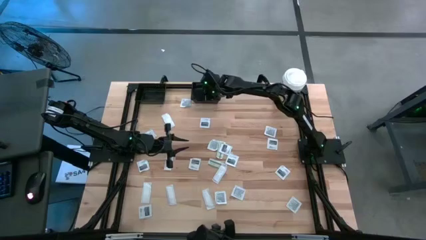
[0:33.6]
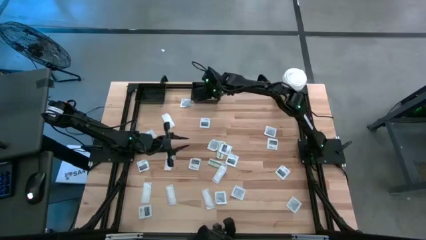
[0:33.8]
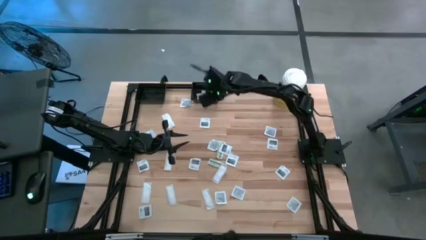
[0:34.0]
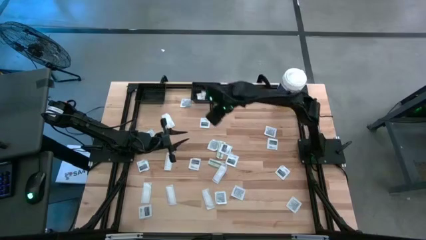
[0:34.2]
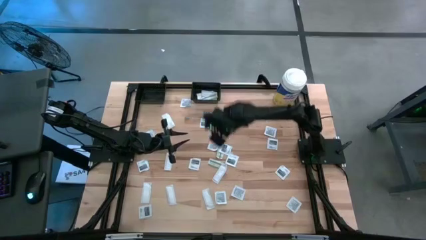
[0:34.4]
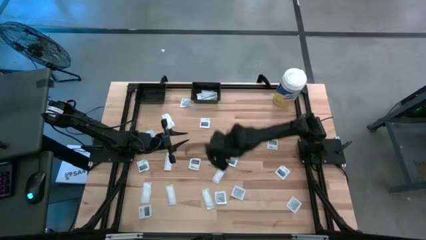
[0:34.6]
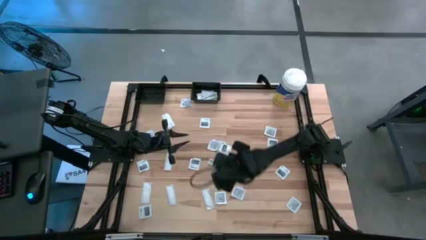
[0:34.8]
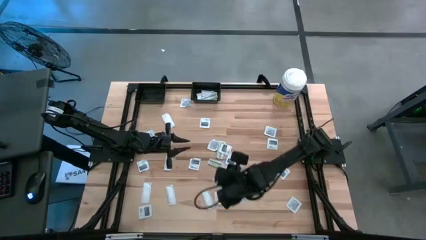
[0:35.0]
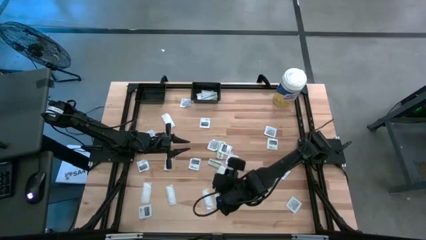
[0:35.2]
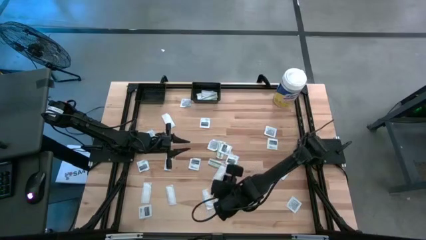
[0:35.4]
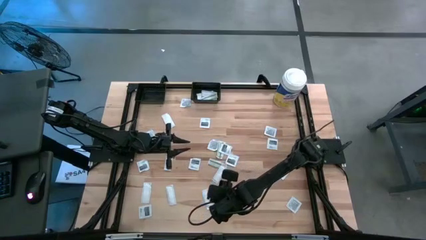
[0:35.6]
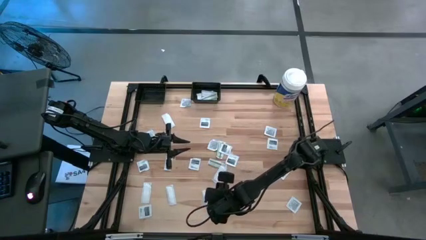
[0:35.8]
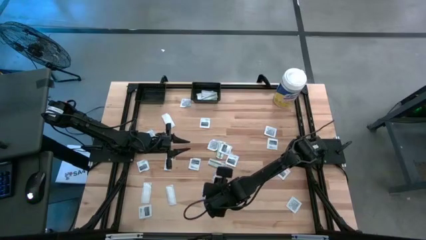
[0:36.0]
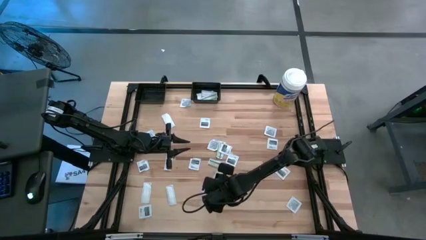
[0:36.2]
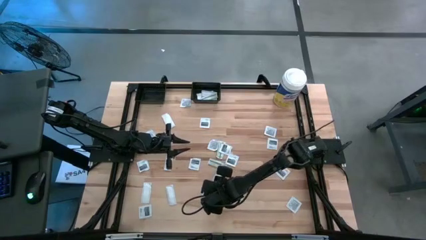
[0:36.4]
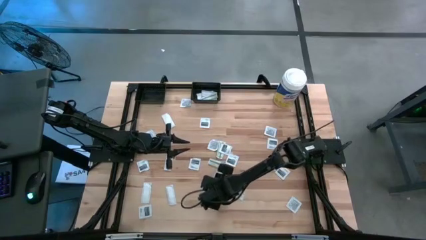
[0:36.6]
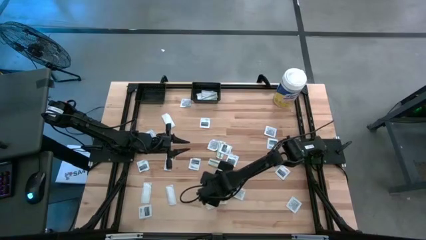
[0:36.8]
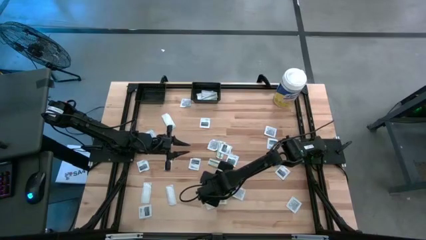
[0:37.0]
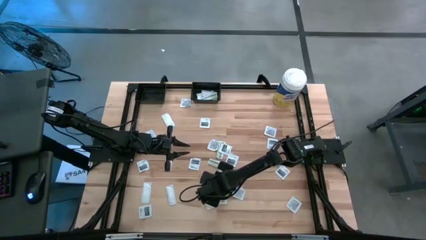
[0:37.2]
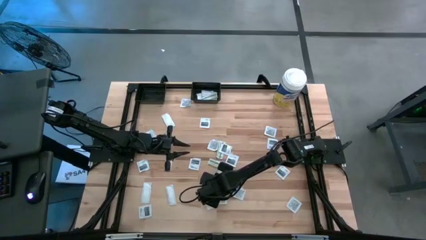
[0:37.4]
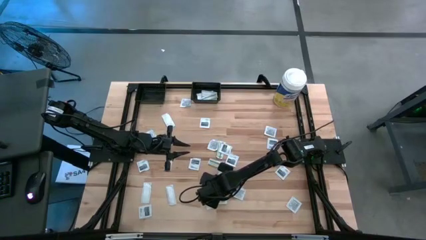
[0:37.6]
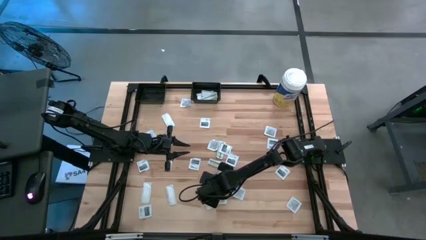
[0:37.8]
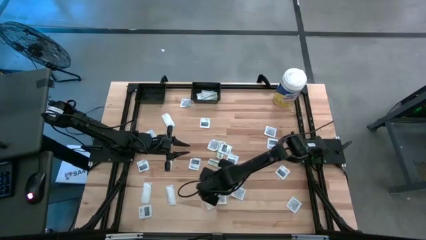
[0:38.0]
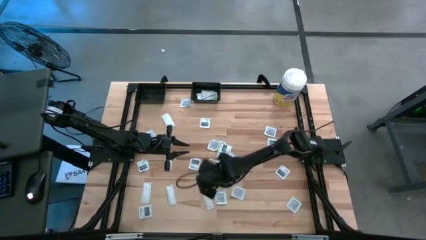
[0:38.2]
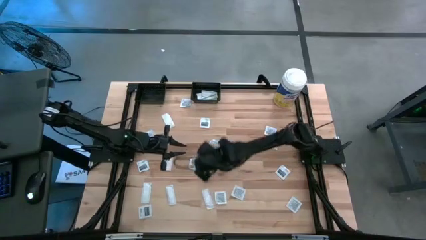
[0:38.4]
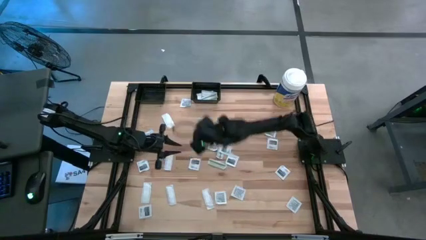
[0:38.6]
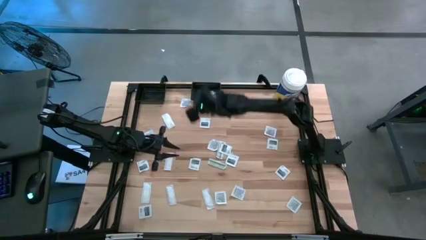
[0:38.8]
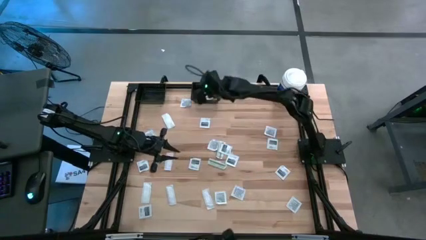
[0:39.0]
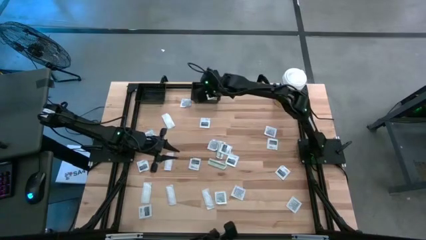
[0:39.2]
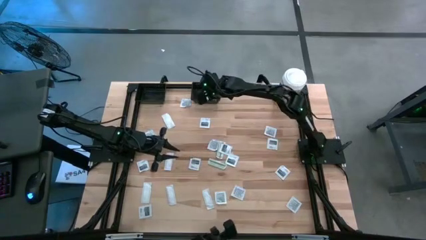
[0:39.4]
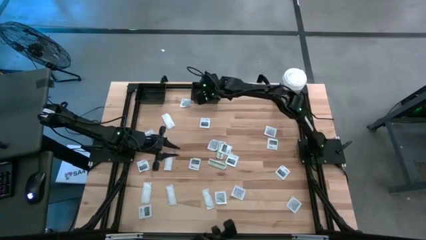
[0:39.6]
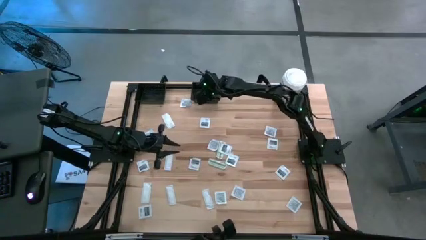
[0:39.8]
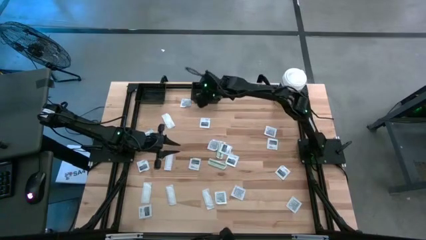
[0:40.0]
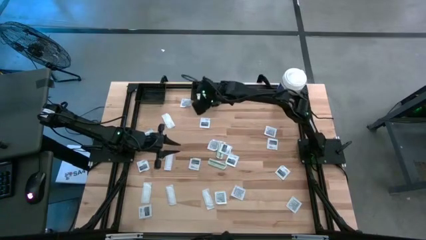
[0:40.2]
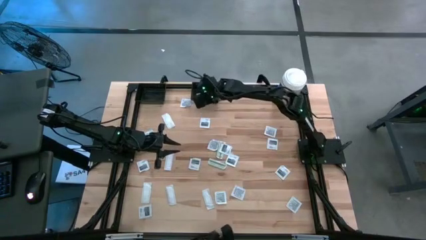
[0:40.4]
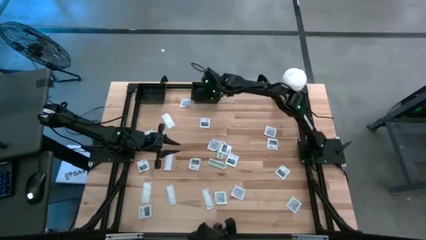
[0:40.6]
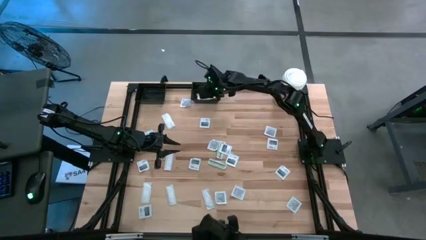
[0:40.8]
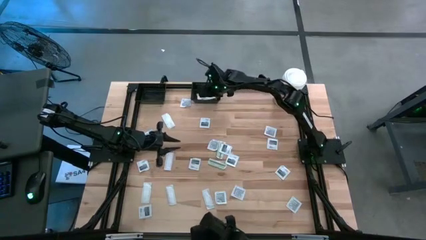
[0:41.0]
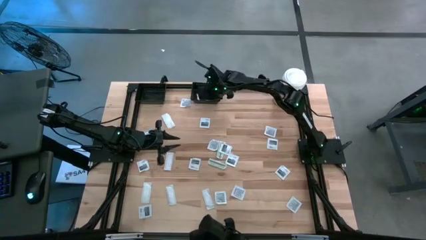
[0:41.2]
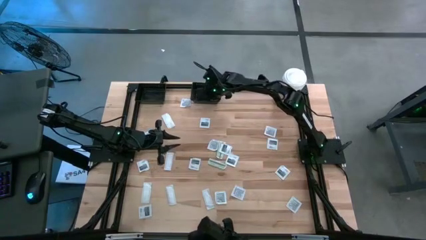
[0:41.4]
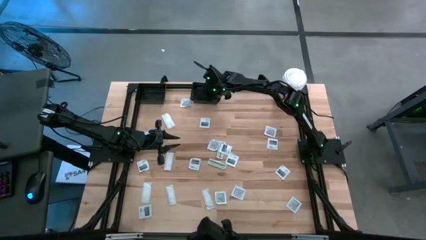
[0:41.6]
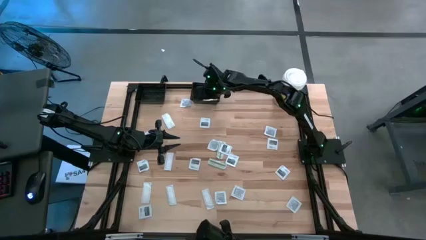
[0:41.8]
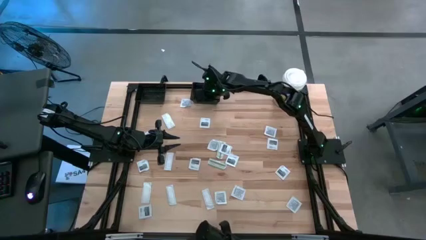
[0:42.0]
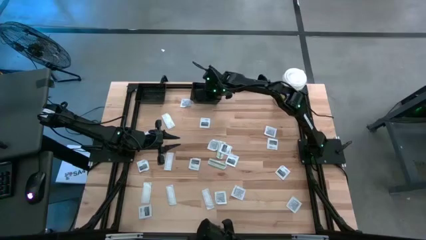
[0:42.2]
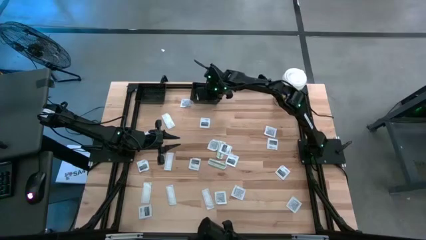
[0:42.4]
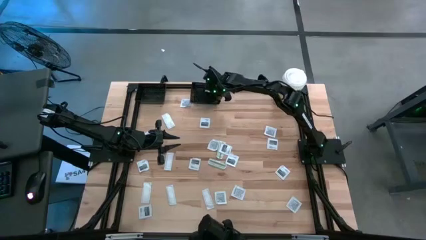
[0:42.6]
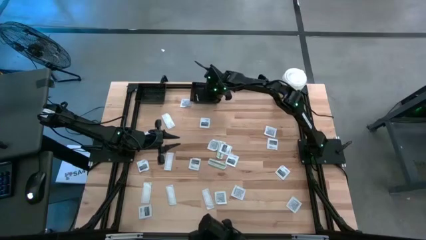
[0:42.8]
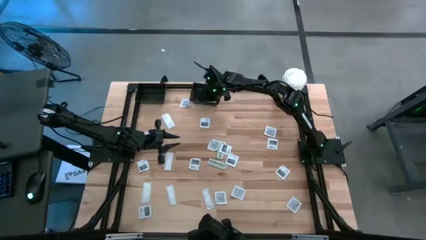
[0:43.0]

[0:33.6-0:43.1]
Task: Pick & Place First Aid Supplies
Put the green bandage pack into the right black bin

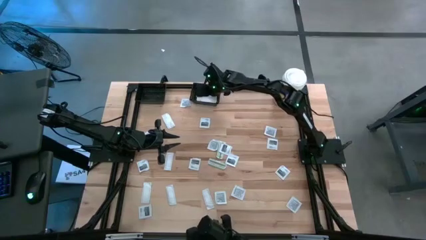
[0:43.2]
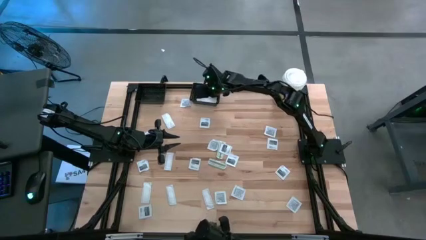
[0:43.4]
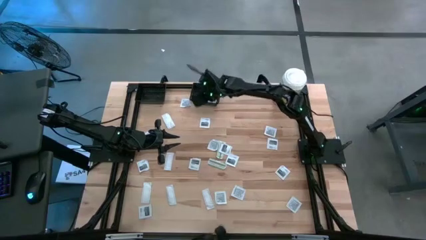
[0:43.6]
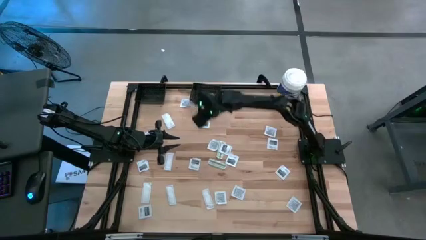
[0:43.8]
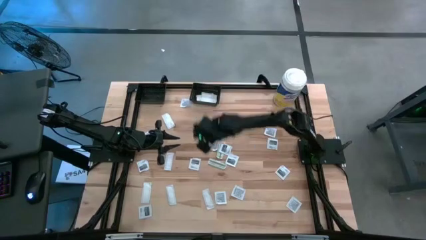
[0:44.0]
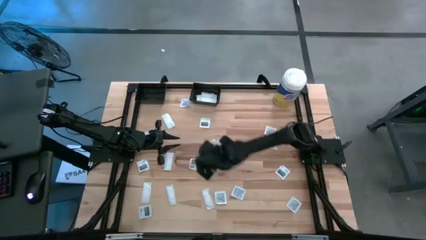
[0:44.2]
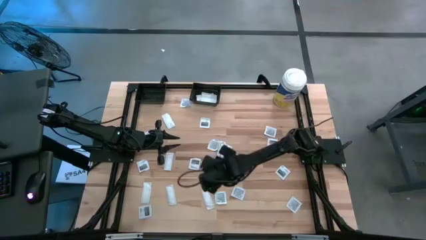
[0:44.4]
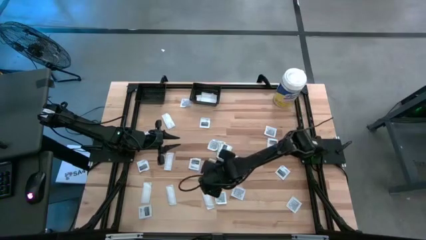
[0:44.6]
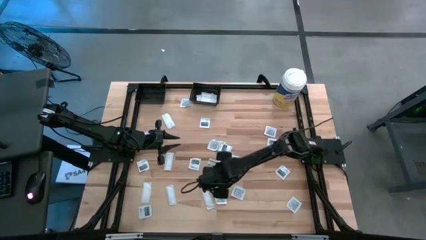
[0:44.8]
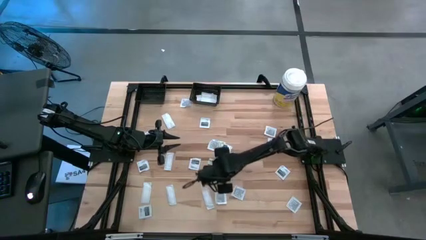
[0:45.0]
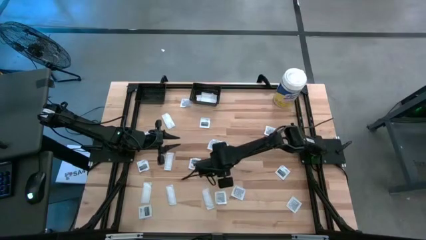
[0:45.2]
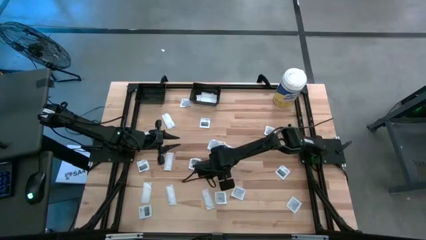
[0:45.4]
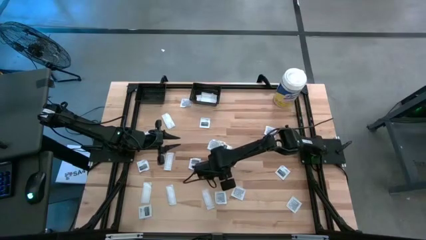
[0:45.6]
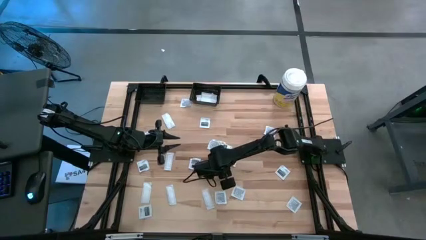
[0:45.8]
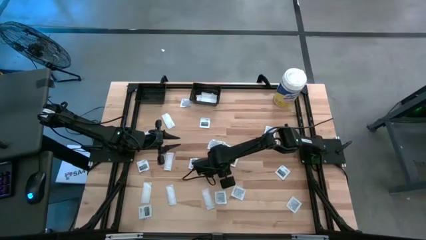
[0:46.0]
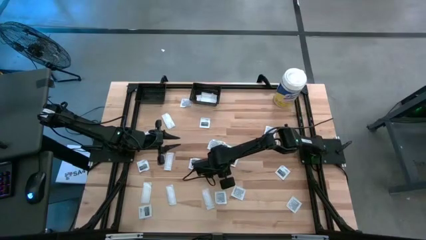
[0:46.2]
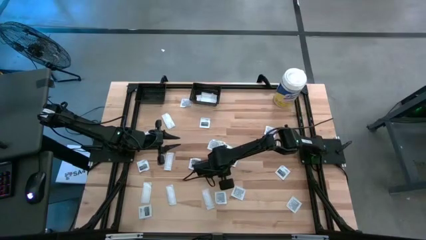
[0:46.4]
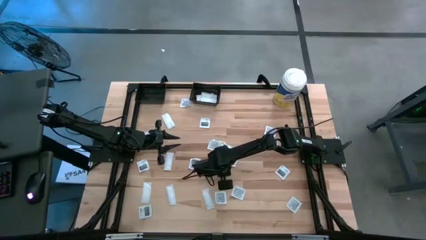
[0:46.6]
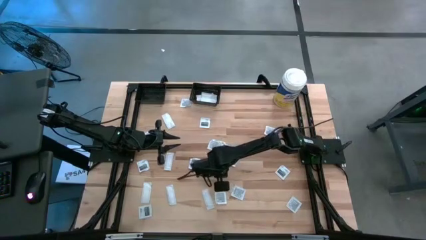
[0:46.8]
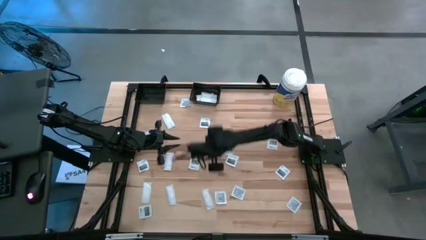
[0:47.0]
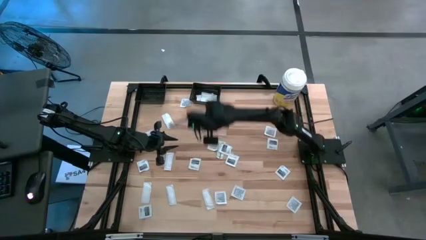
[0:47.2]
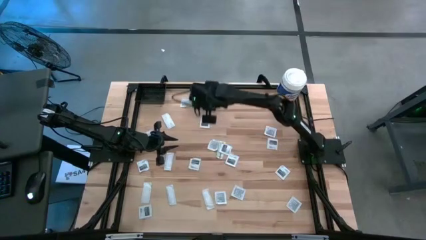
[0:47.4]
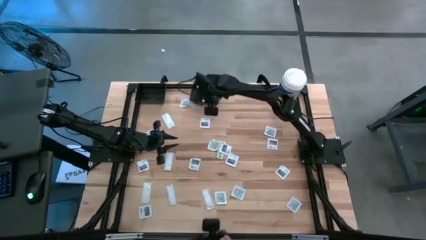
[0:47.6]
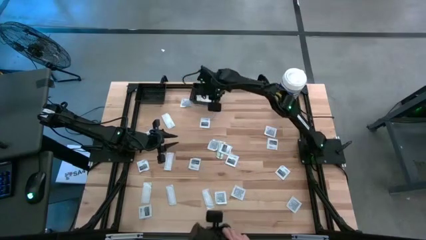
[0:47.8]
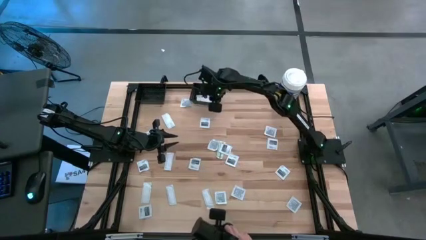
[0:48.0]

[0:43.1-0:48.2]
Put the green bandage pack into the right black bin

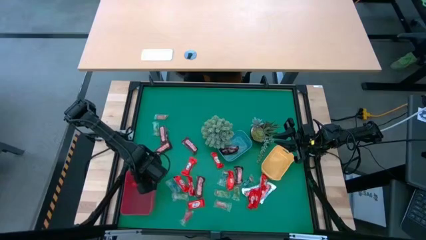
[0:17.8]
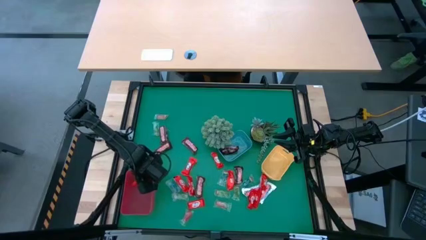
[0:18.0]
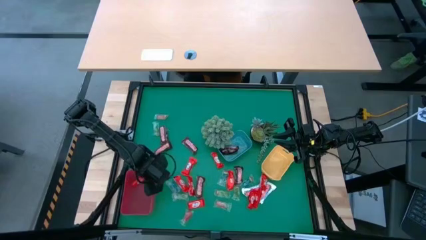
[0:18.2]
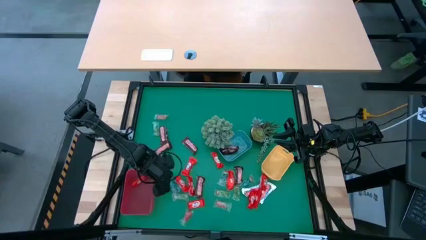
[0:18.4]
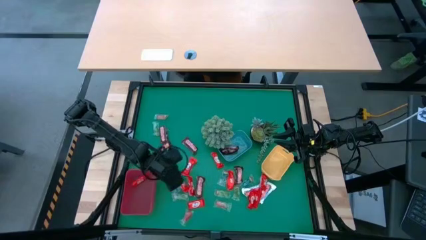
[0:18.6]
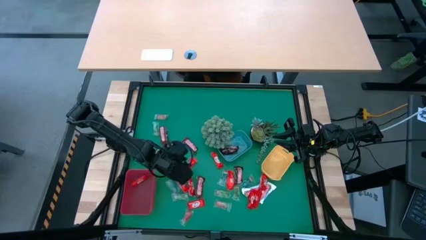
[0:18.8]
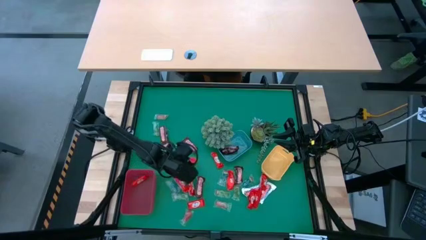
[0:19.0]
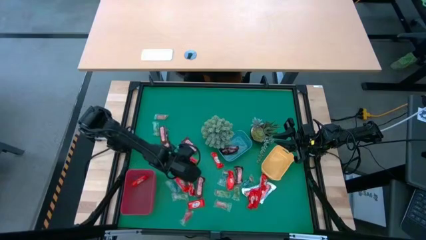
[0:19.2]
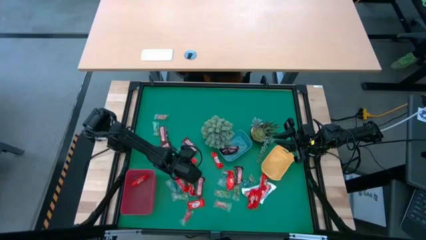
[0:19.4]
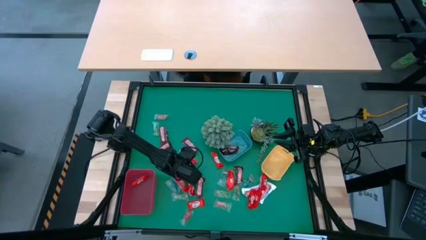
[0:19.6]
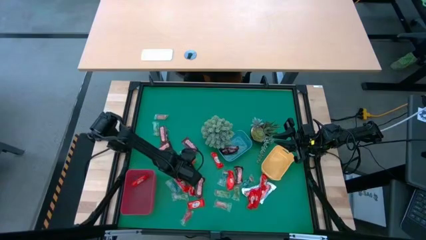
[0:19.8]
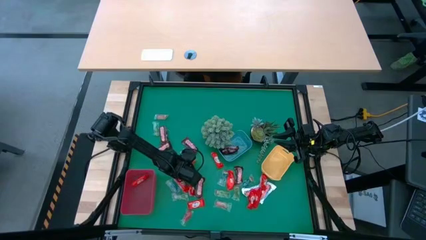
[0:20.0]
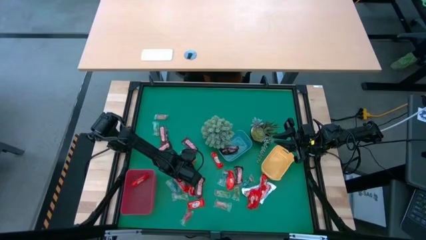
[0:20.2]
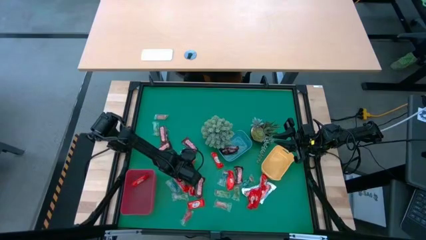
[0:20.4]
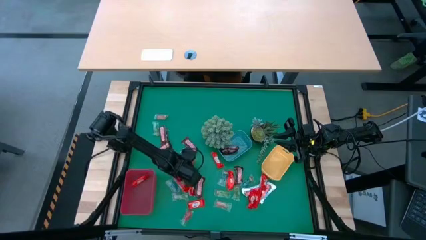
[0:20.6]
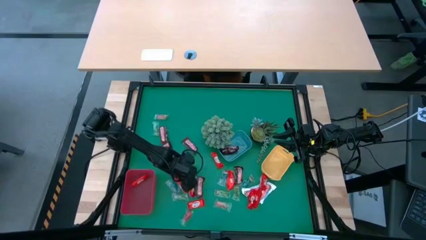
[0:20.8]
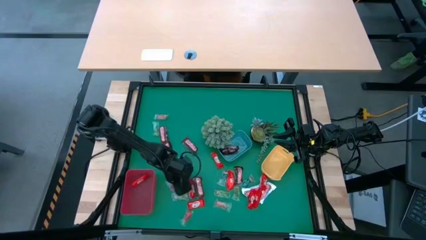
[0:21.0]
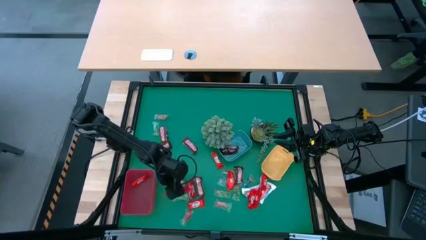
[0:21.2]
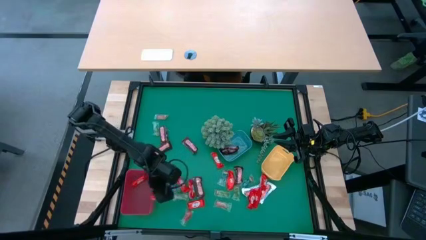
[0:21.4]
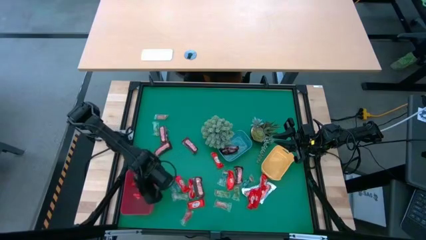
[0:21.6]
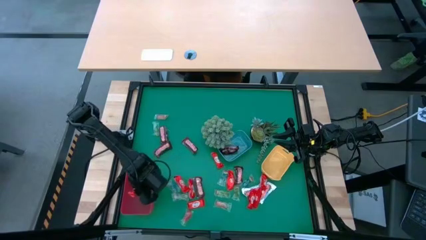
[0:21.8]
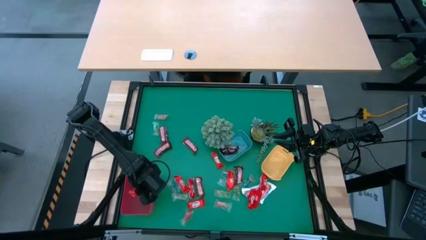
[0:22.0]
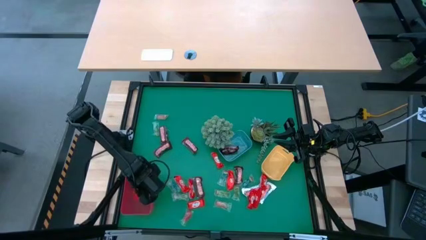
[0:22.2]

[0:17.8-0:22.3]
Task: Organize candy in baskets
Put the red chocolate into the red bin
